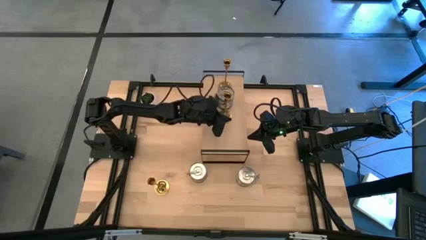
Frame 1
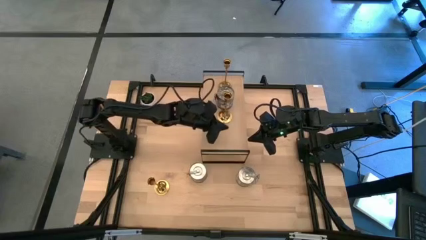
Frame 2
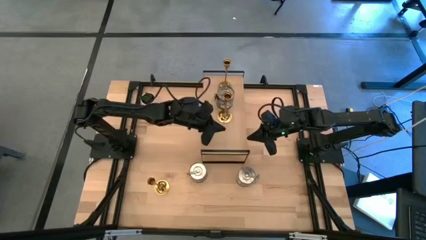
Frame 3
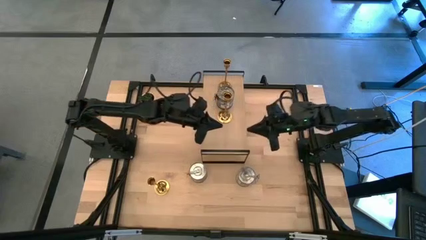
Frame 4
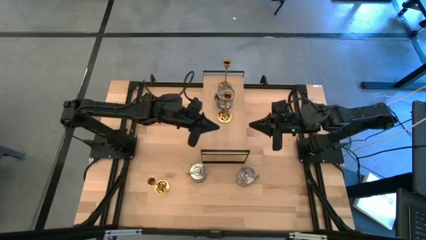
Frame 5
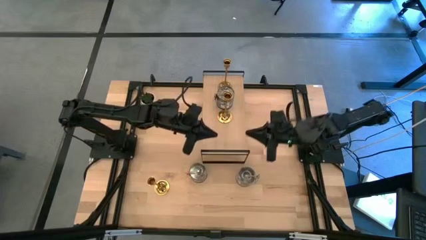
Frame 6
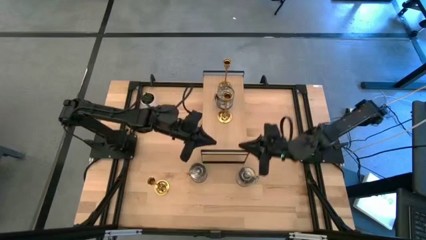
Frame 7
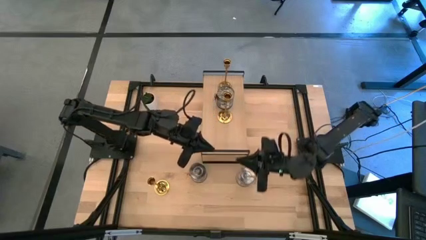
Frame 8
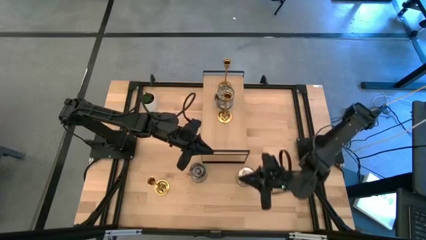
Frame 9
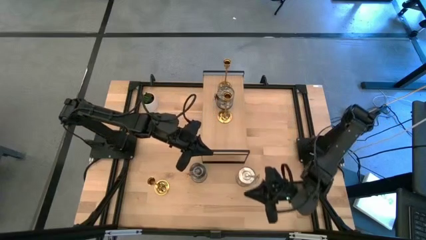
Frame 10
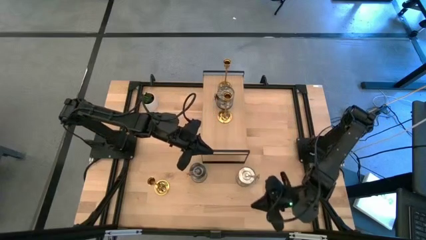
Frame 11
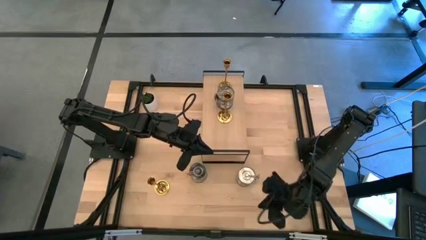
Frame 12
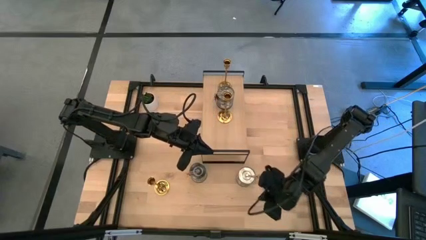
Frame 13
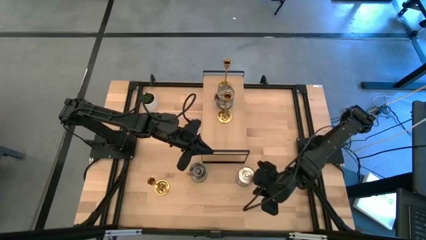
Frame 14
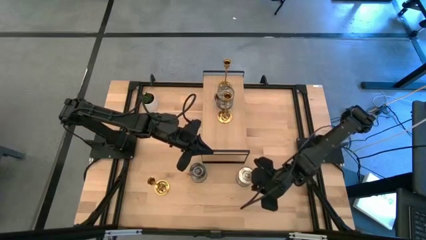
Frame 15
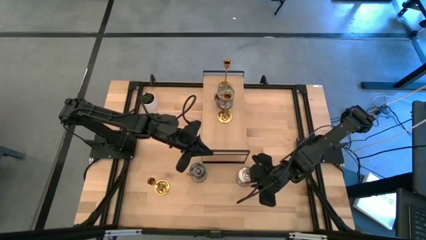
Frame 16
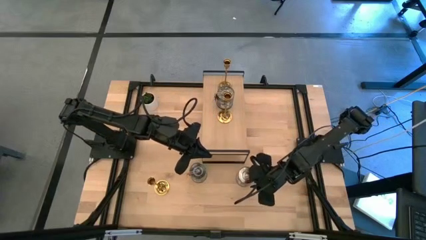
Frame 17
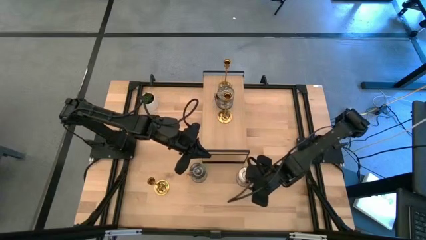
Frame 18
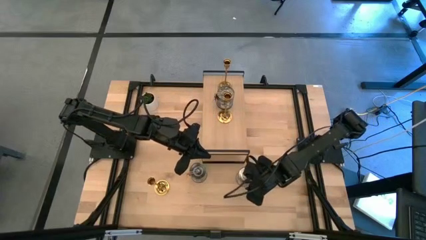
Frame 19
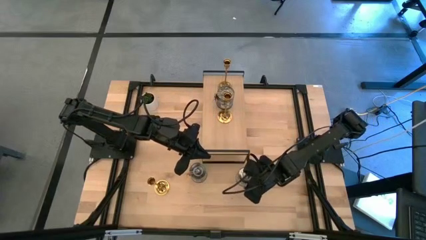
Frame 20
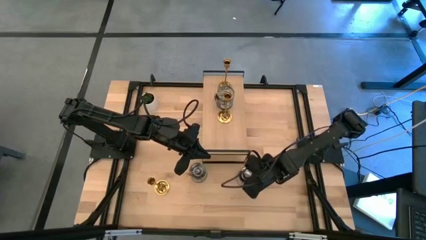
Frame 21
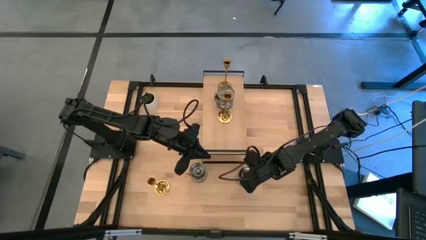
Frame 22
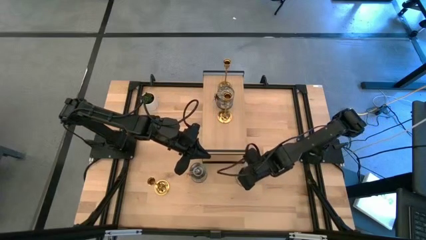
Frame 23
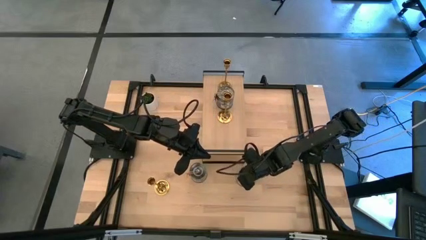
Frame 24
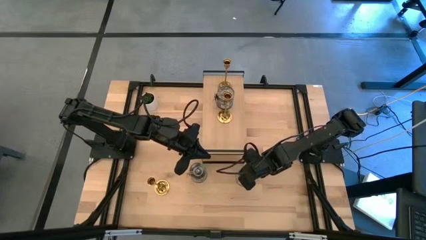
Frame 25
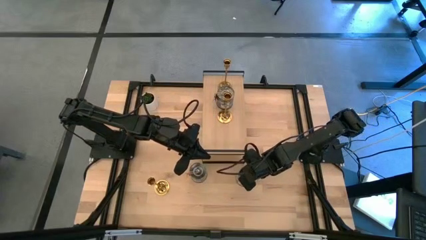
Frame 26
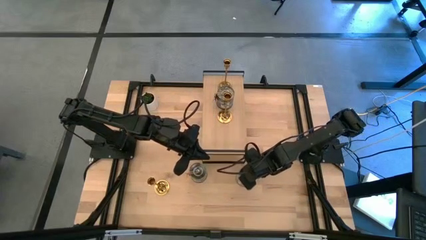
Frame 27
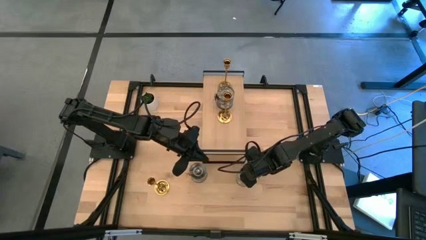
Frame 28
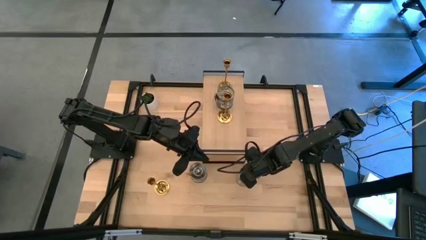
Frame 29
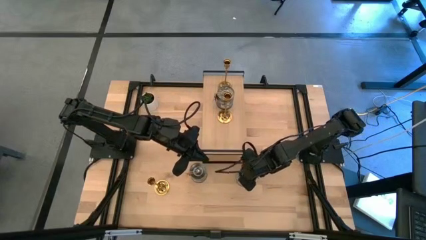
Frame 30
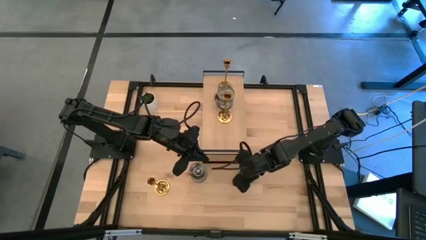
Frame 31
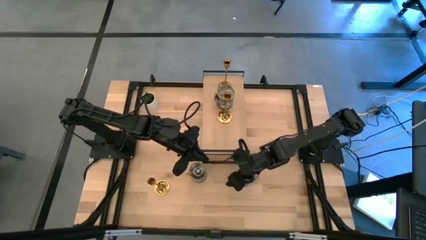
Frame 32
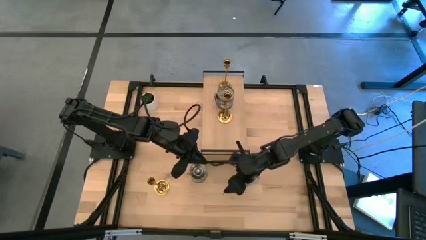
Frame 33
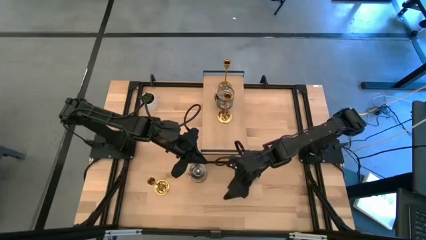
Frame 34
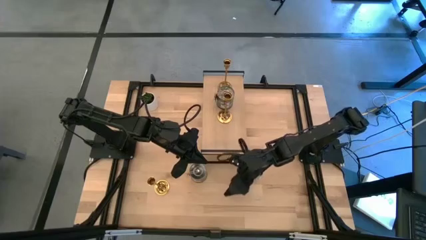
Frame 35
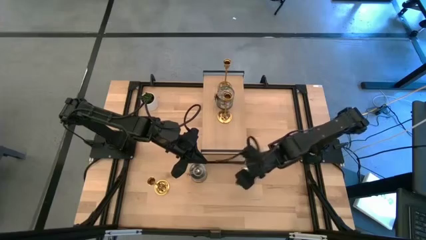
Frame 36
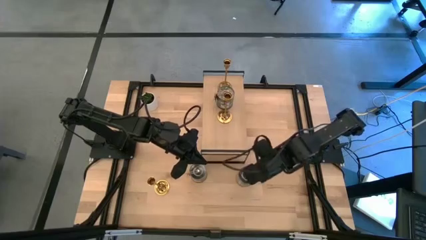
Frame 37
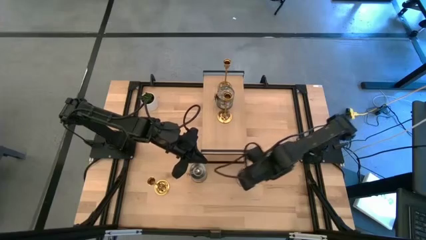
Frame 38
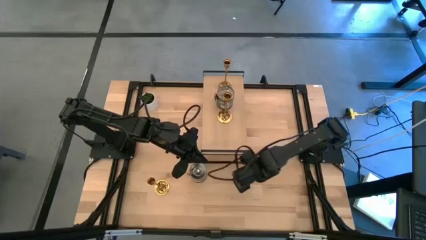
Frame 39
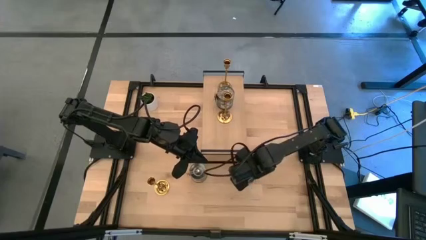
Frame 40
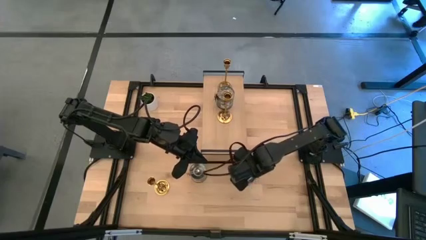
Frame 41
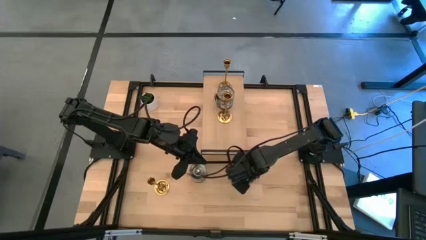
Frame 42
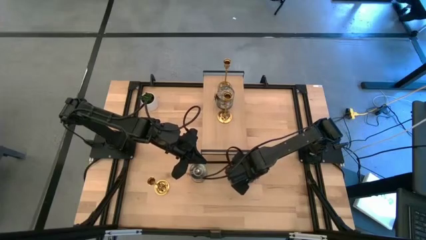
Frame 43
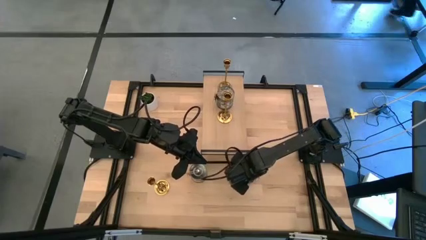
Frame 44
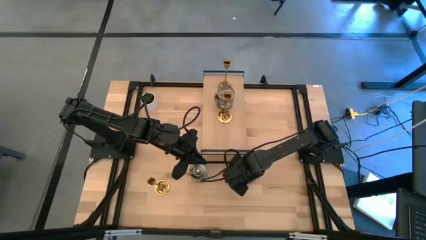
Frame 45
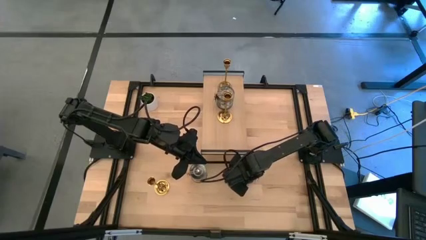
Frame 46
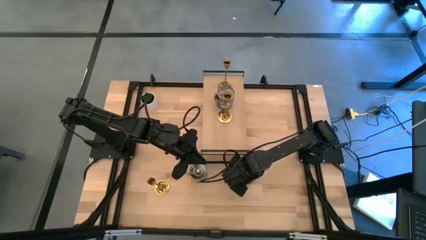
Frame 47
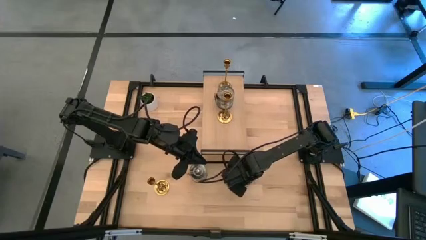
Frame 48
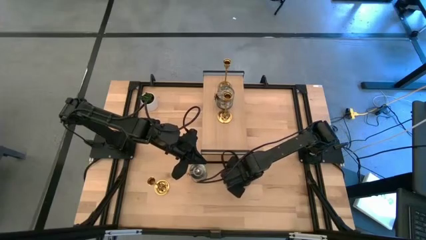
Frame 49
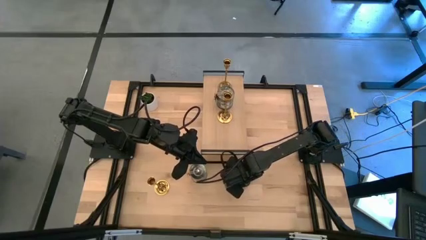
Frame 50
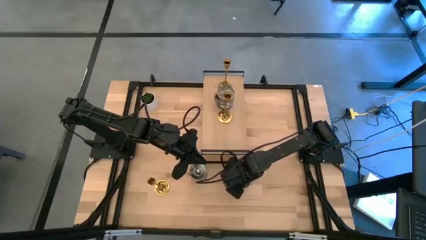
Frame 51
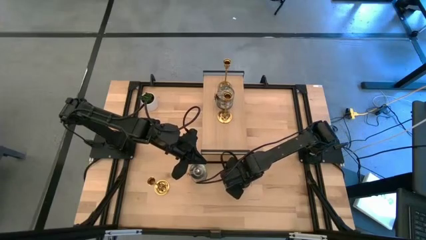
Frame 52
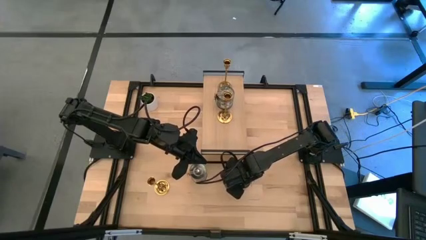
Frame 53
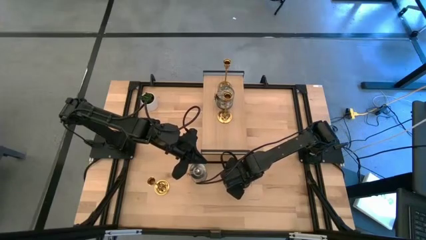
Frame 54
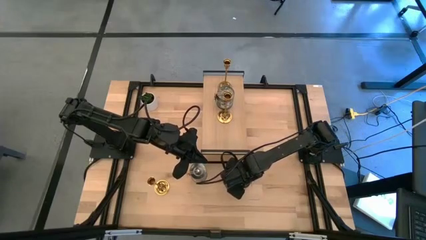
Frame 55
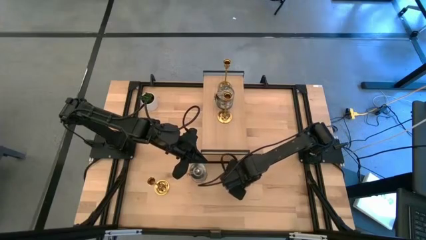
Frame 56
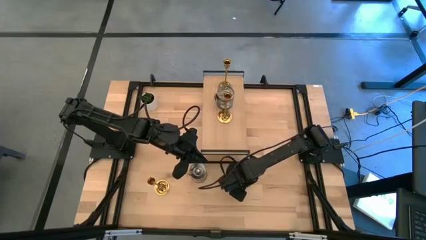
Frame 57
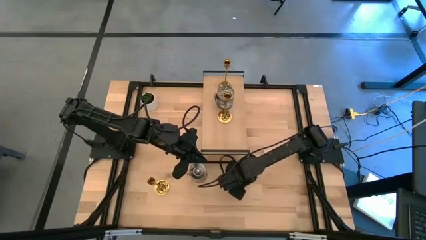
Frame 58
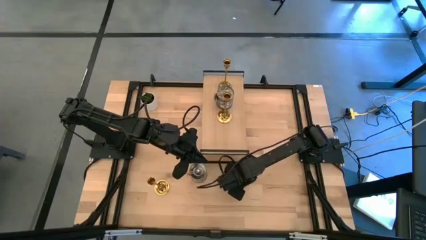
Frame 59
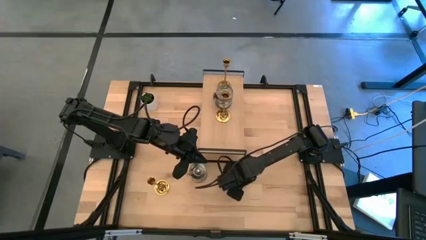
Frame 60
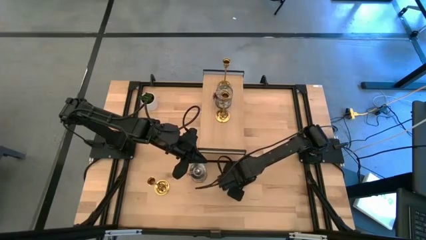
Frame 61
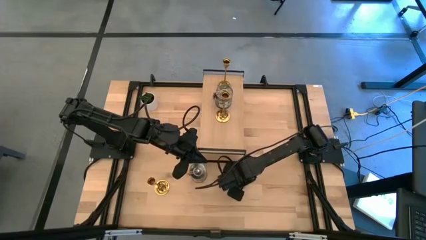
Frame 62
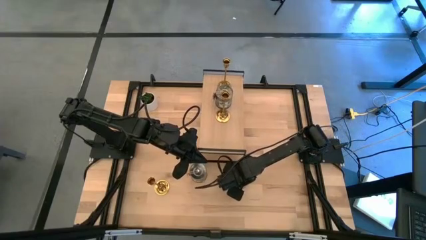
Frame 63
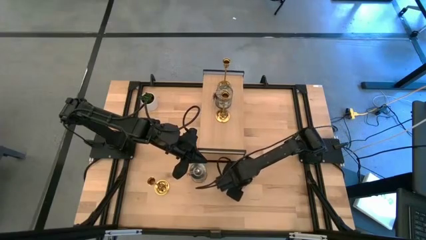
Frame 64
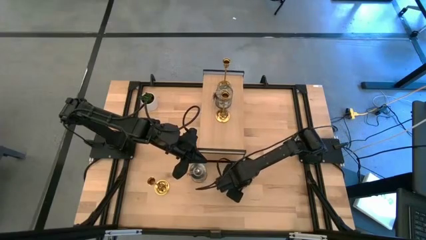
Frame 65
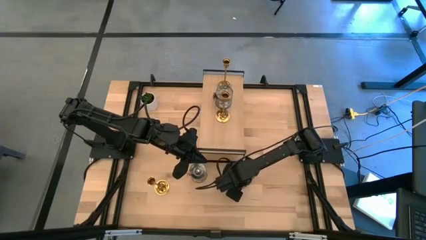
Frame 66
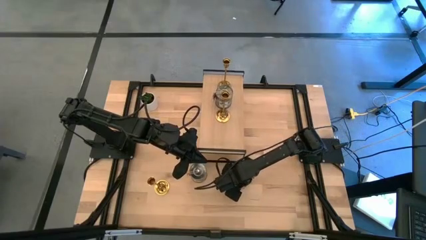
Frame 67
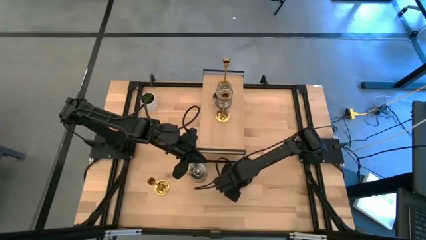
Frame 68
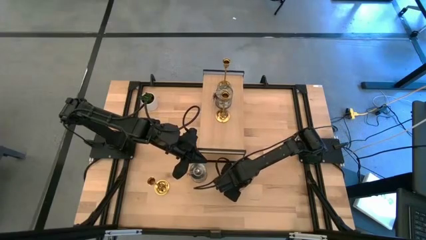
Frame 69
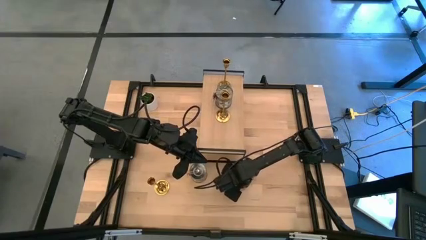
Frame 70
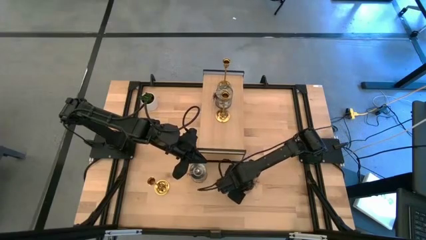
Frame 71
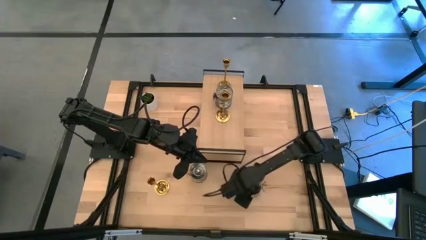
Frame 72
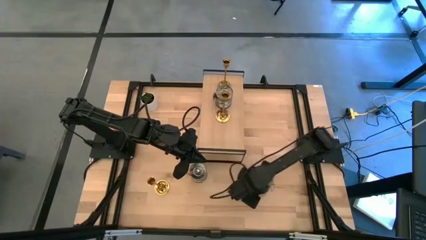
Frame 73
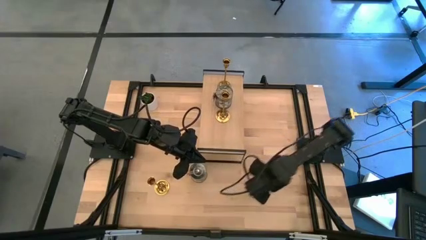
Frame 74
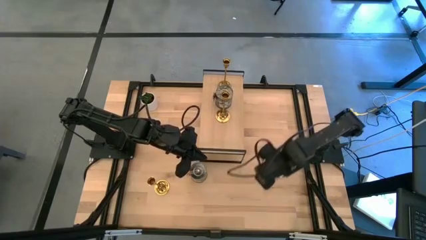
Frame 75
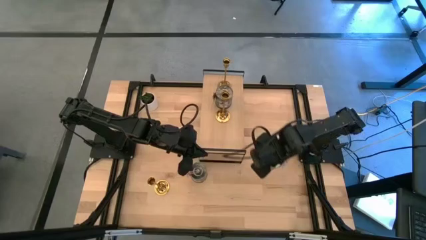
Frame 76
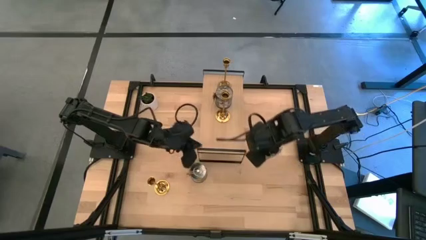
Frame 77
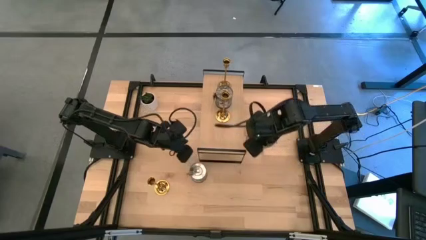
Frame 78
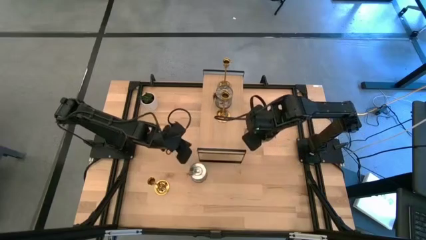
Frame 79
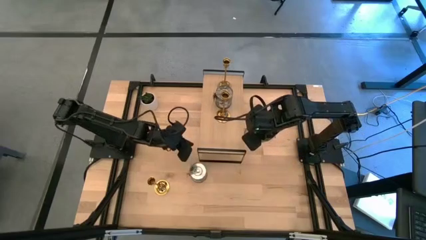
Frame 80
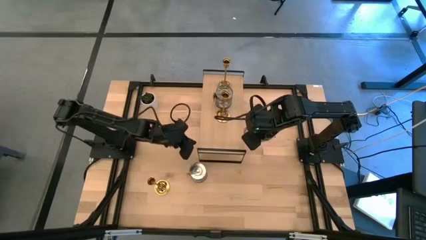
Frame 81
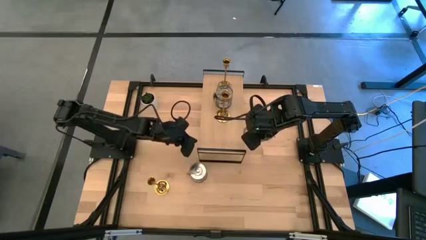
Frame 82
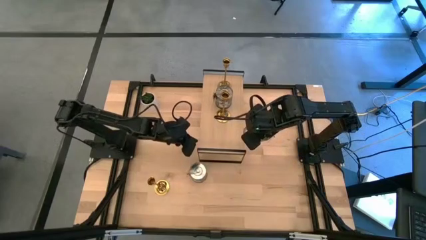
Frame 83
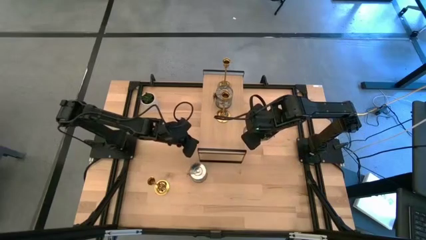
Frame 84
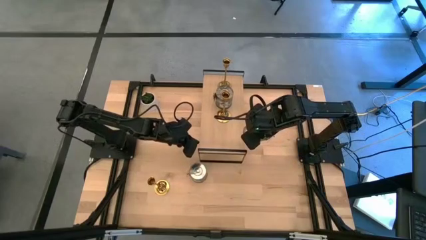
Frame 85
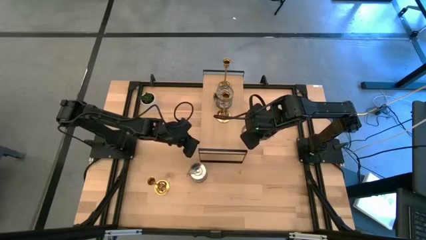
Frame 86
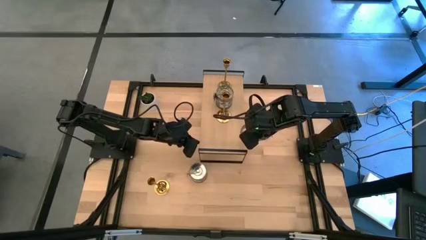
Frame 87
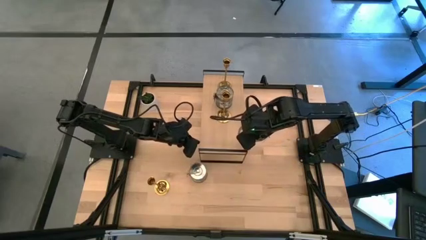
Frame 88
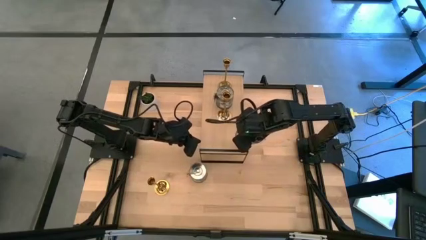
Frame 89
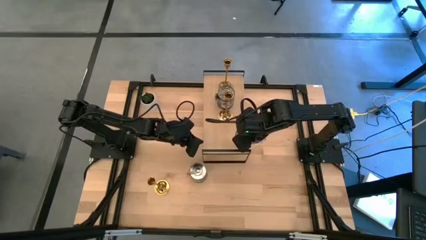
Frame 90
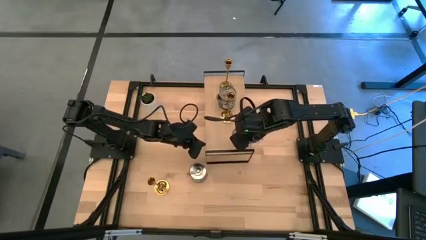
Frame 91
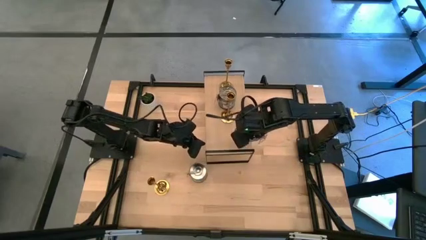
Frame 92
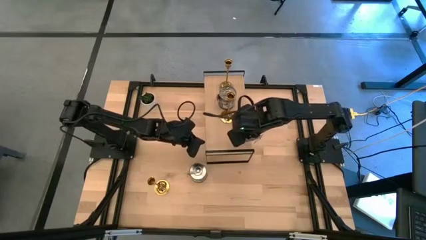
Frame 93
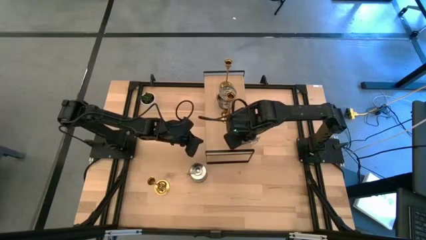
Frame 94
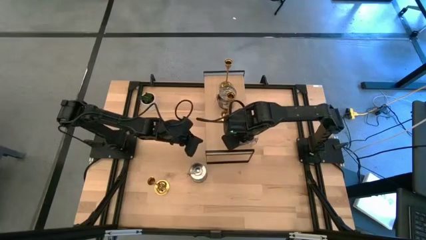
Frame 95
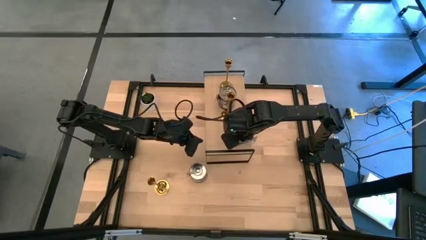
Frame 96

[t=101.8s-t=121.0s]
Task: Pick & Place candle stick holders
Put the right silver scented candle on the shelf
